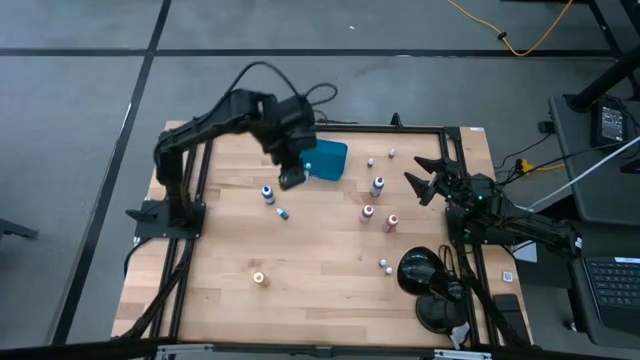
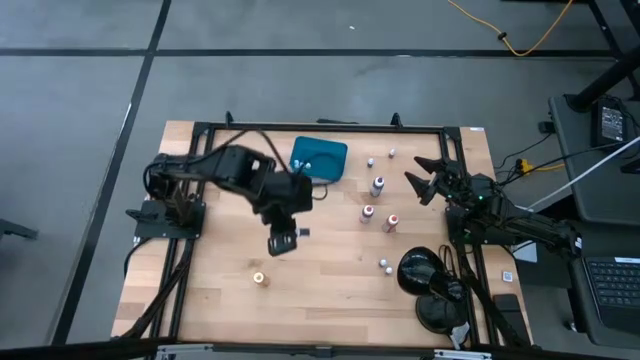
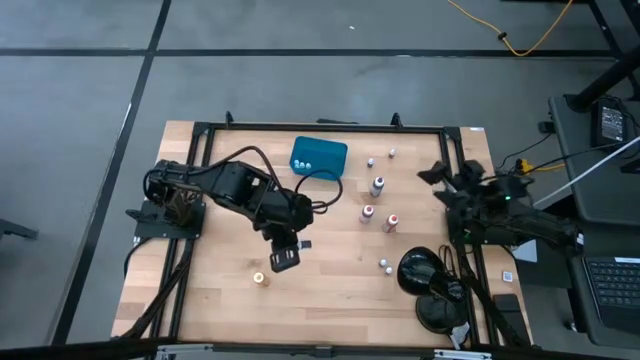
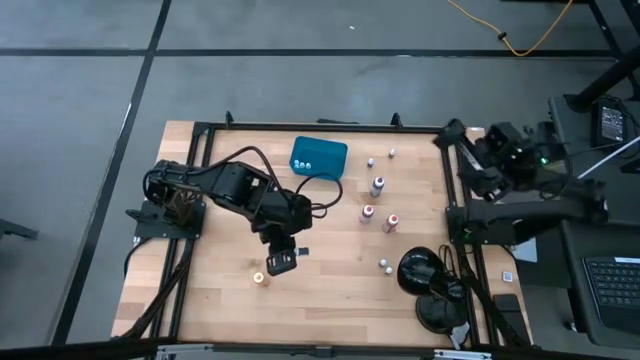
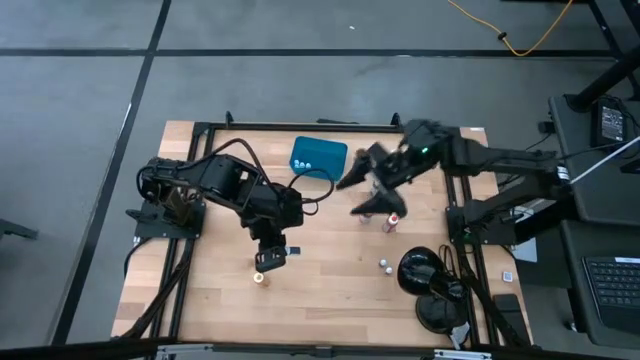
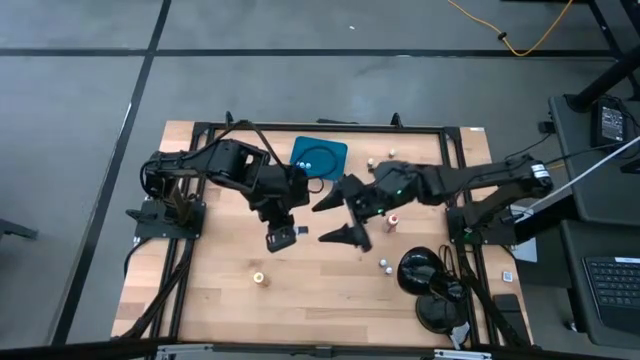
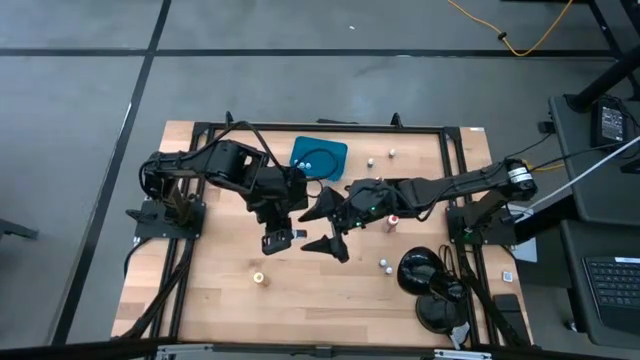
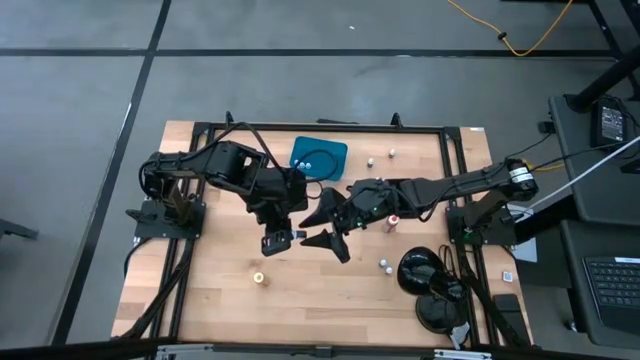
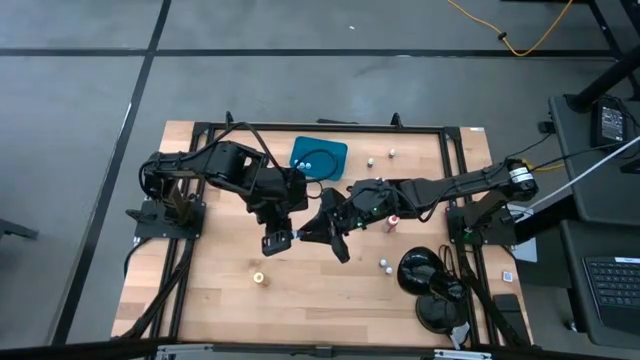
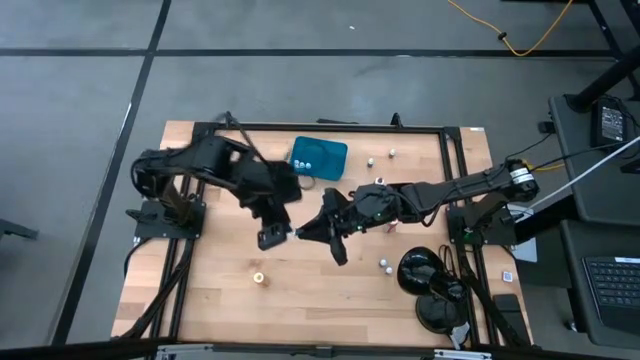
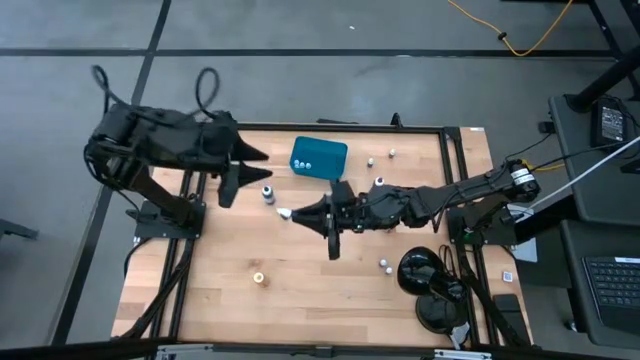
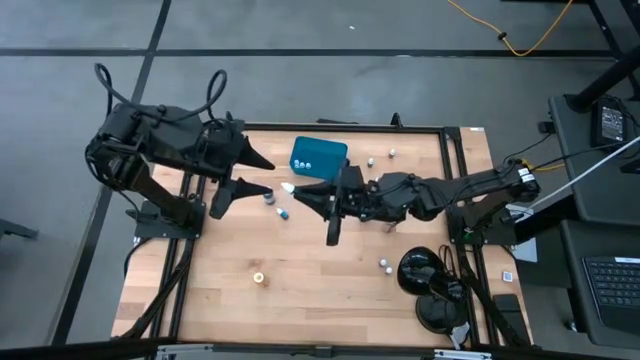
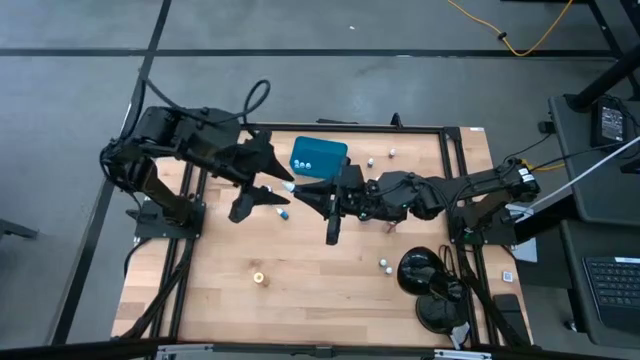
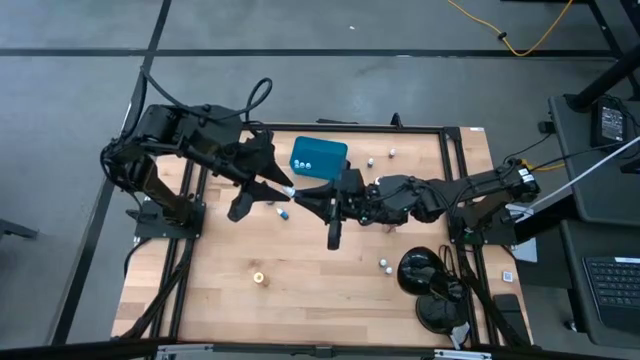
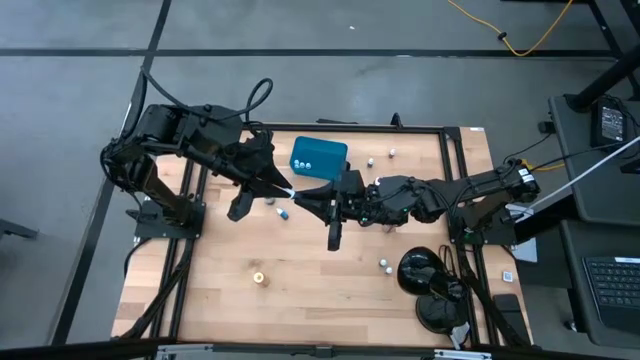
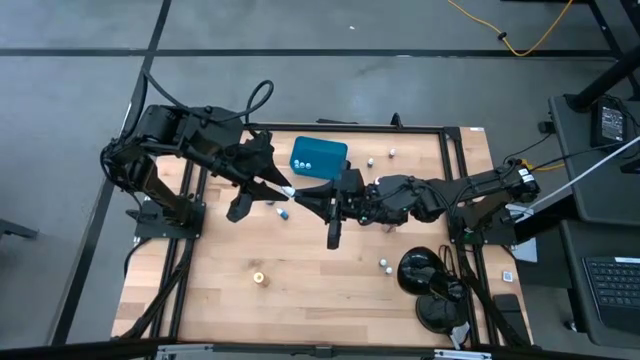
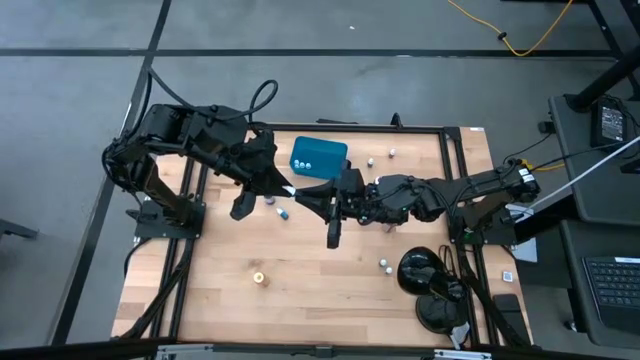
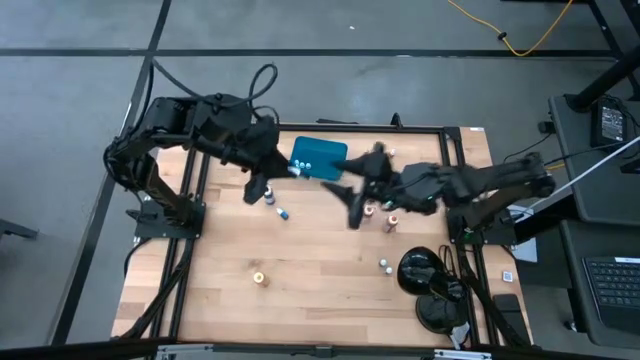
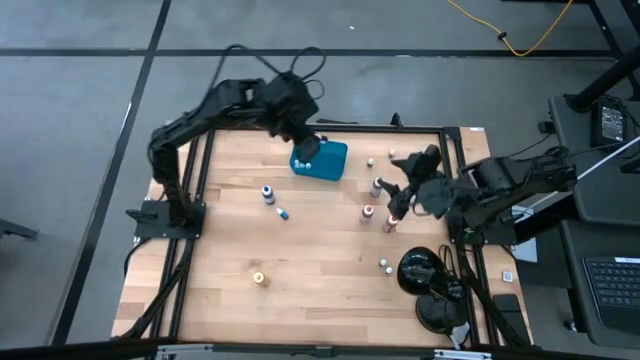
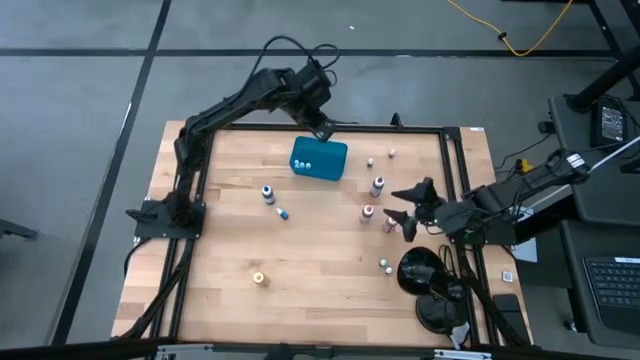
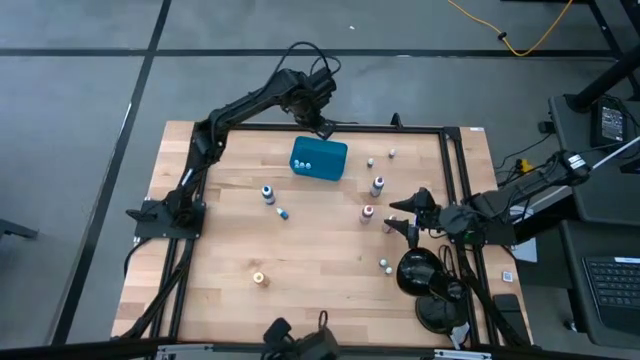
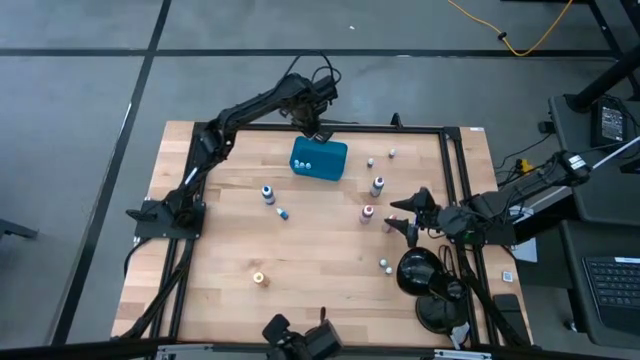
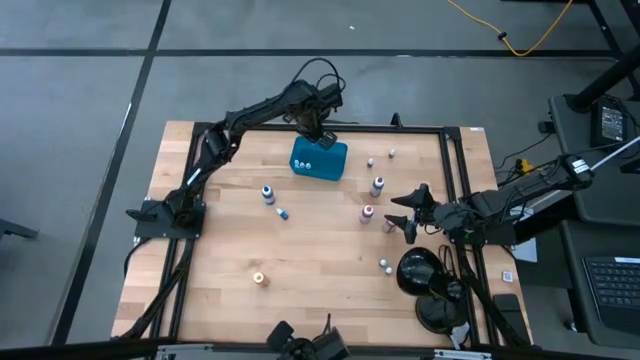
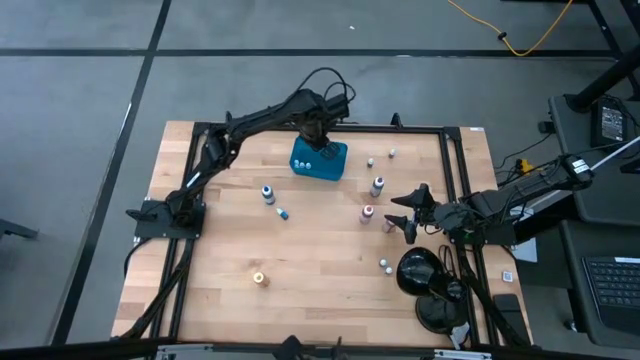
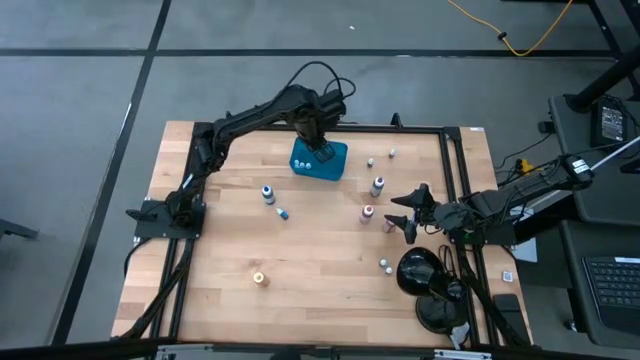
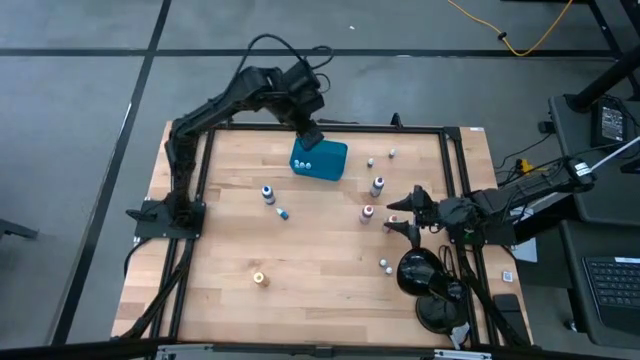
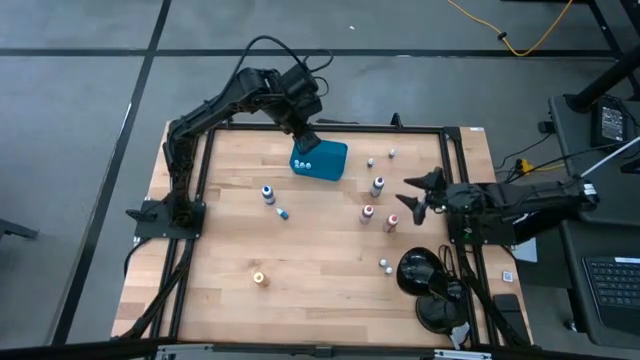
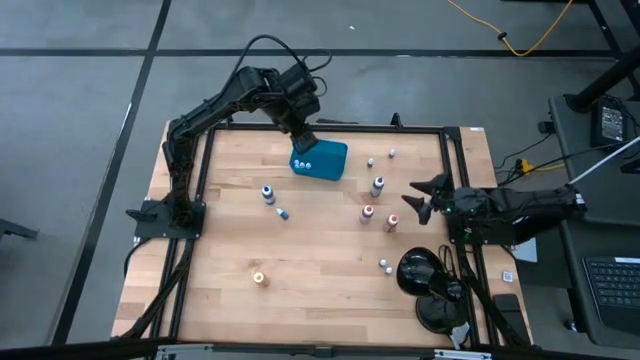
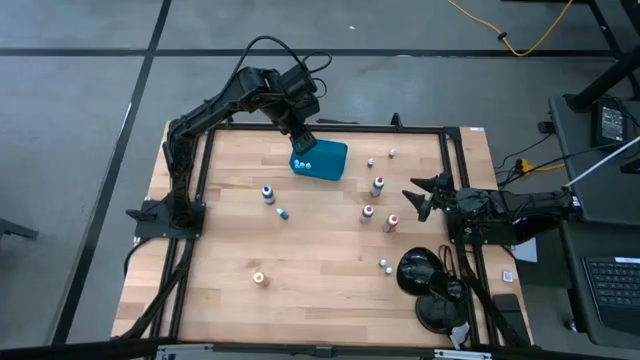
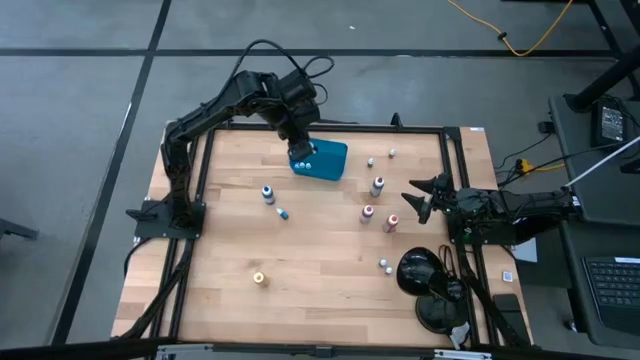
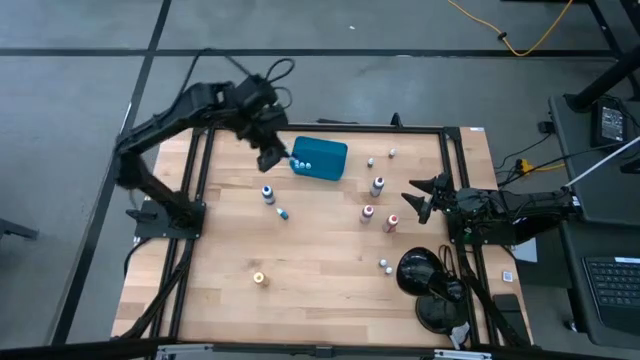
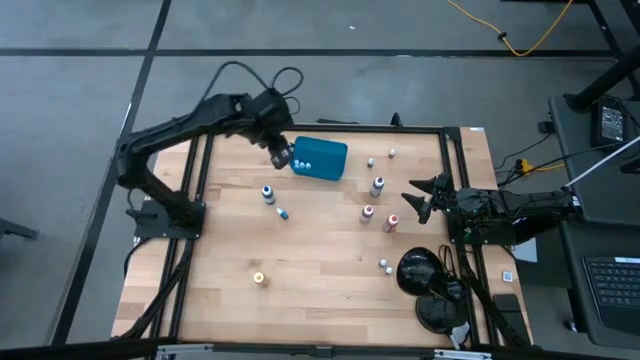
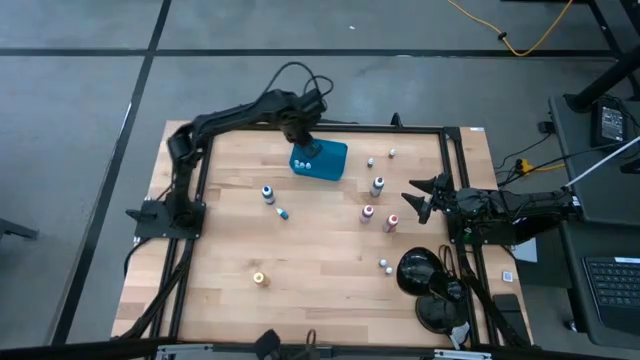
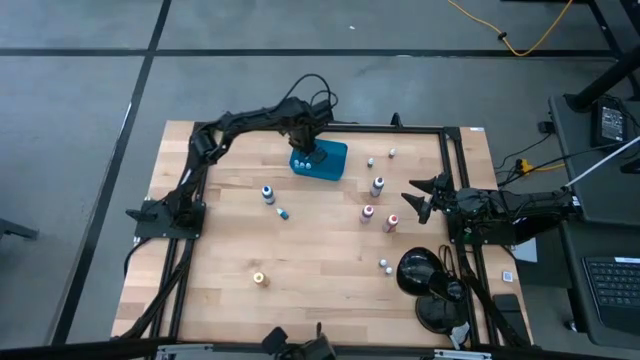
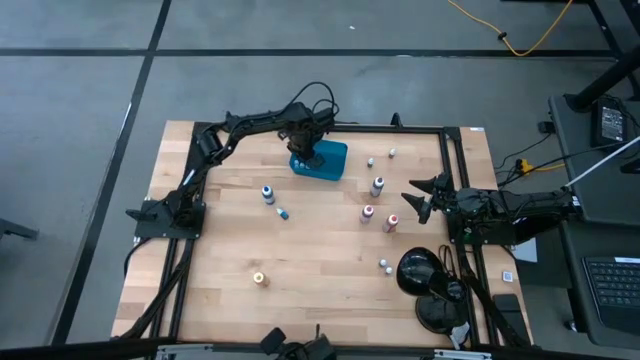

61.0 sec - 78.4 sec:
Task: Pick & Place food coloring
Put the small black food coloring bottle into the blue bin

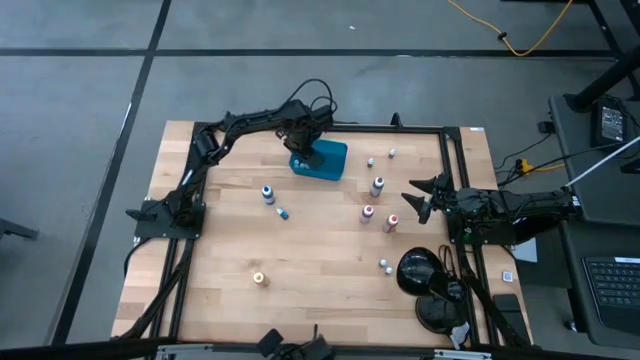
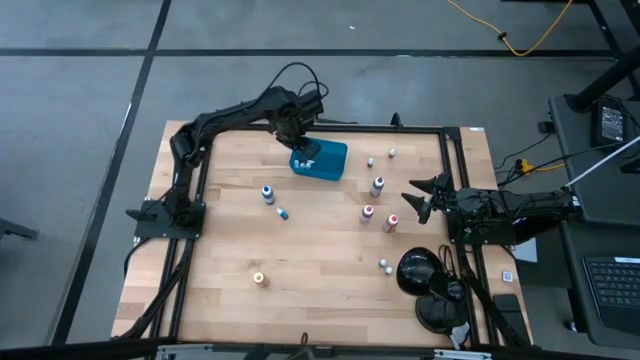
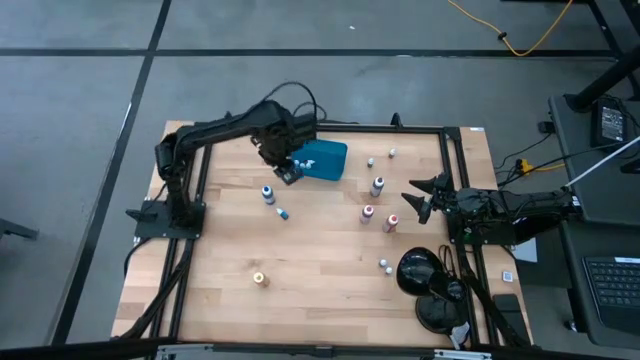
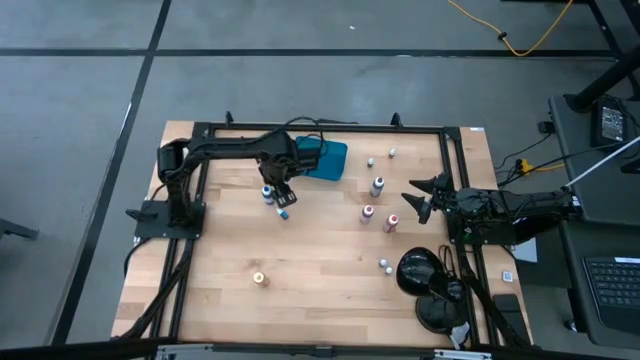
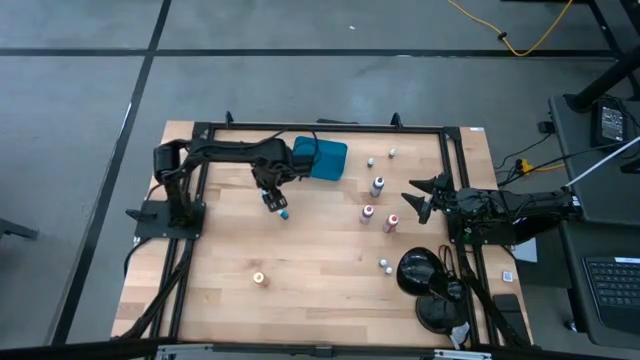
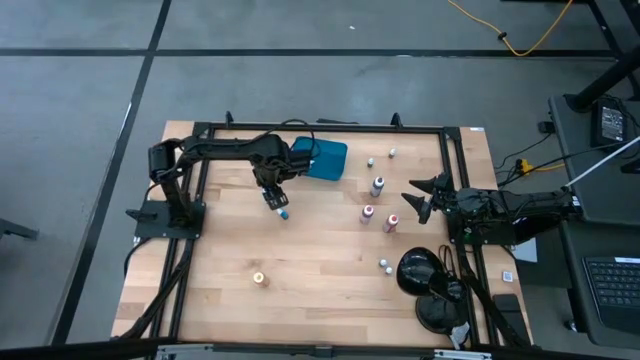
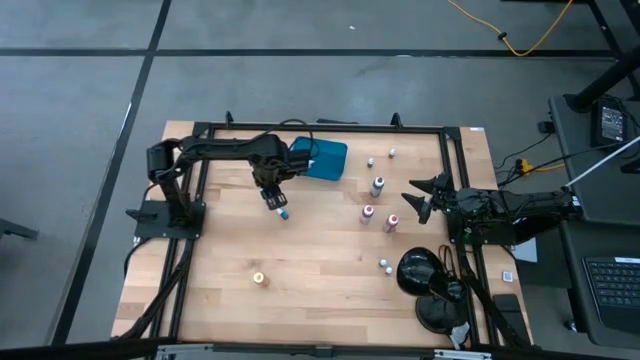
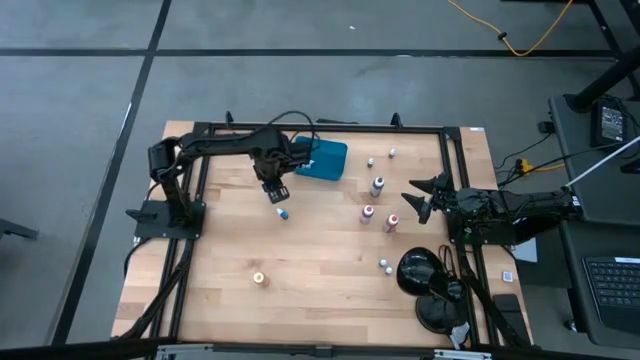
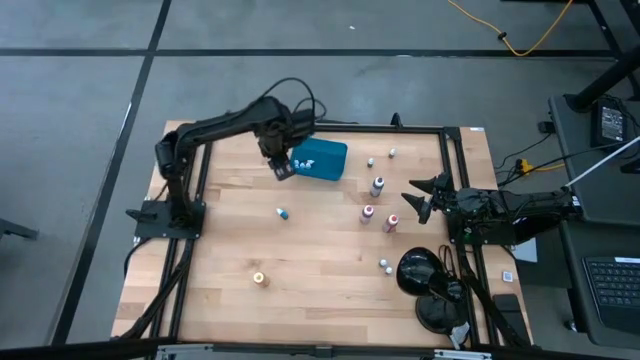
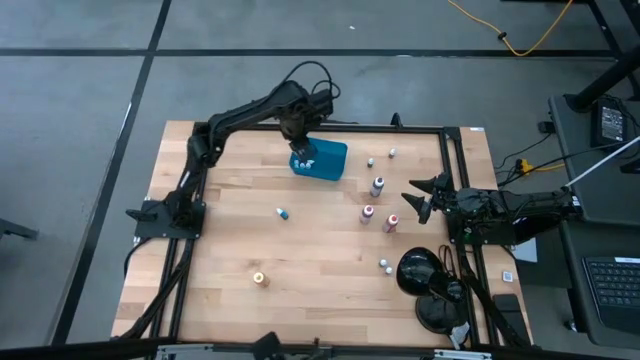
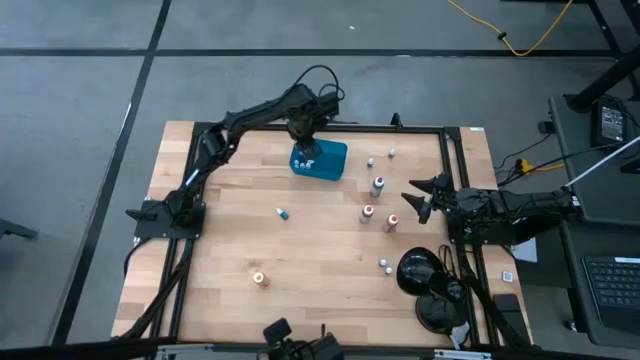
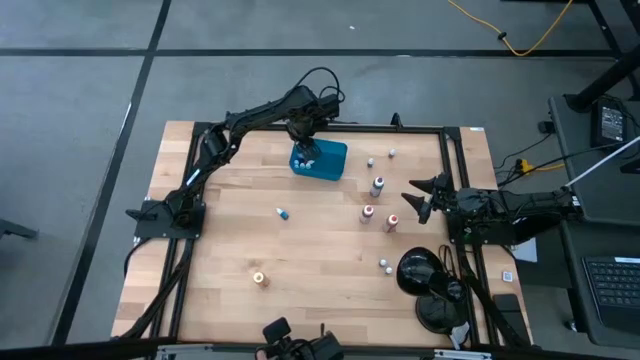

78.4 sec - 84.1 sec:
Put the large blue food coloring bottle into the blue bin
